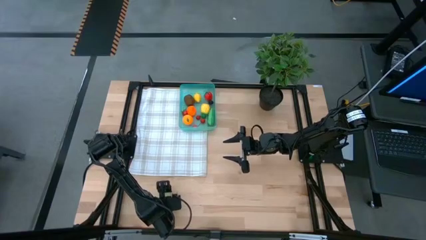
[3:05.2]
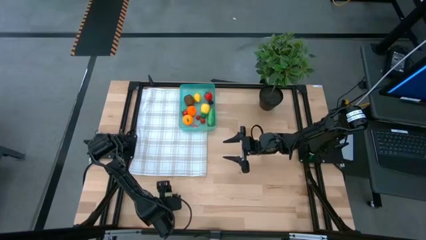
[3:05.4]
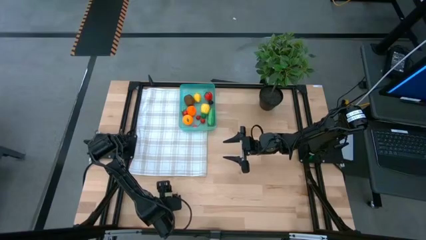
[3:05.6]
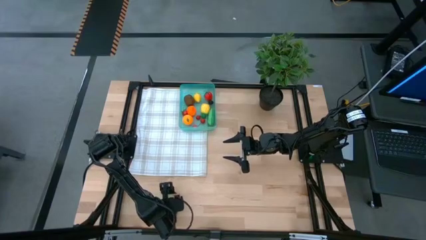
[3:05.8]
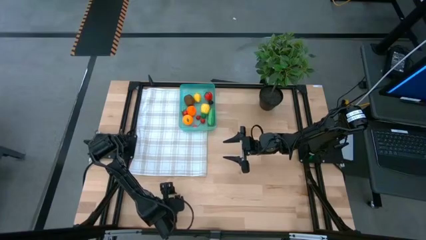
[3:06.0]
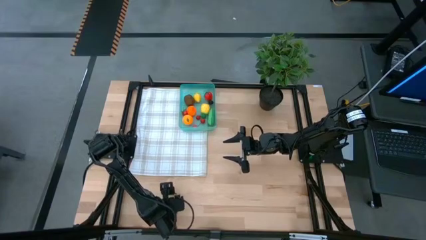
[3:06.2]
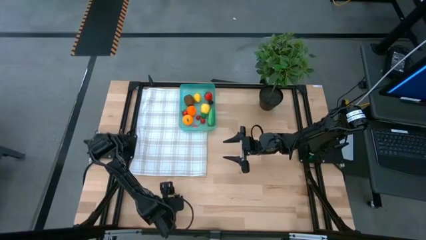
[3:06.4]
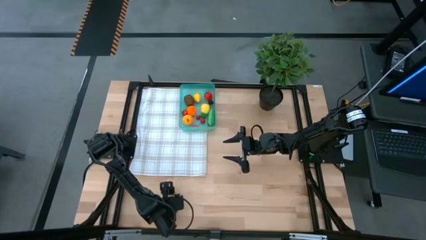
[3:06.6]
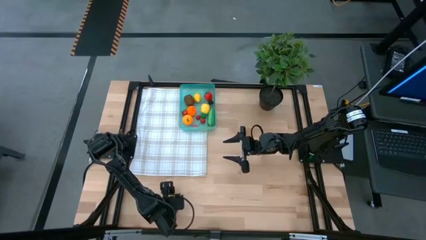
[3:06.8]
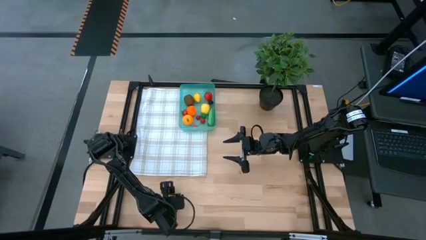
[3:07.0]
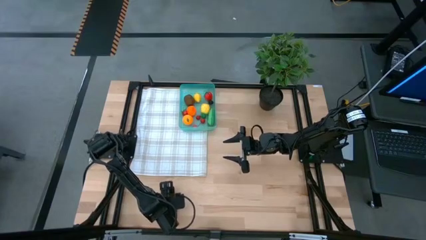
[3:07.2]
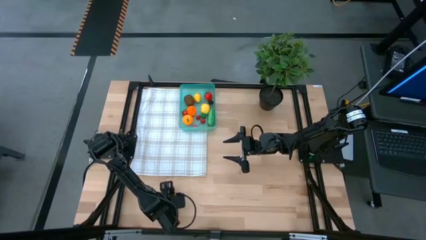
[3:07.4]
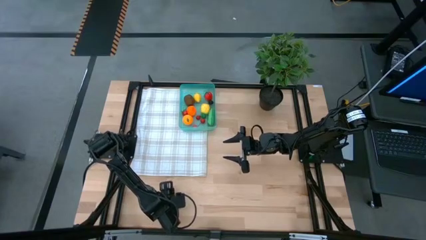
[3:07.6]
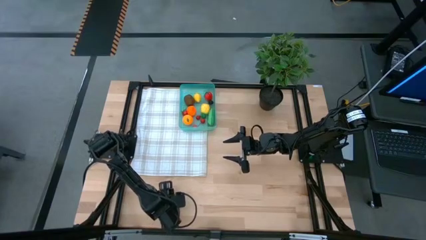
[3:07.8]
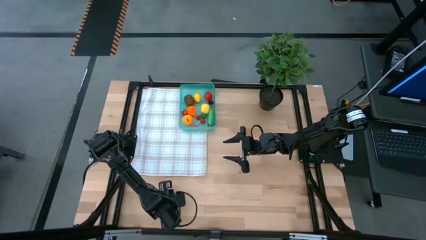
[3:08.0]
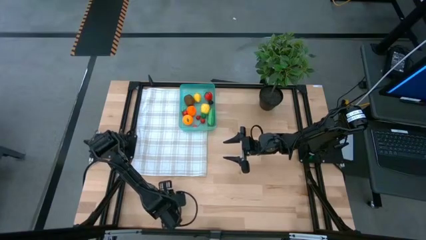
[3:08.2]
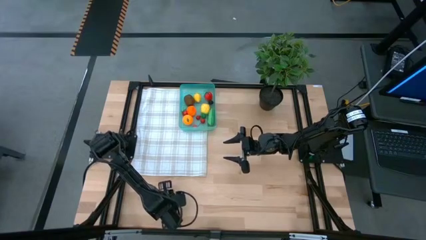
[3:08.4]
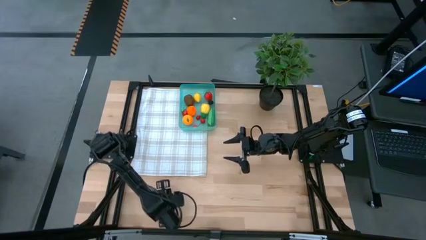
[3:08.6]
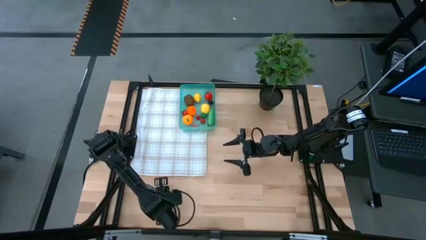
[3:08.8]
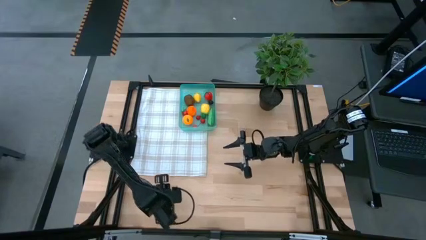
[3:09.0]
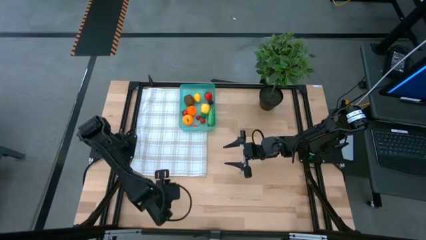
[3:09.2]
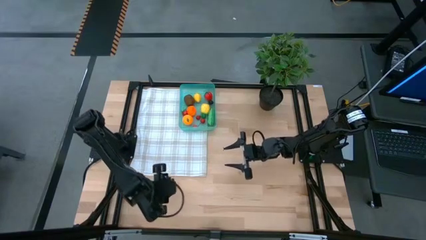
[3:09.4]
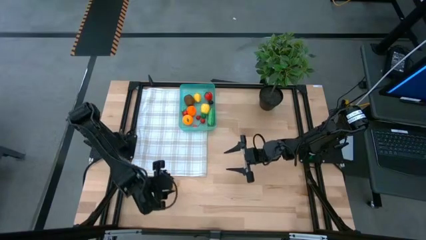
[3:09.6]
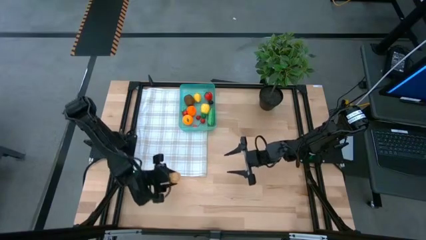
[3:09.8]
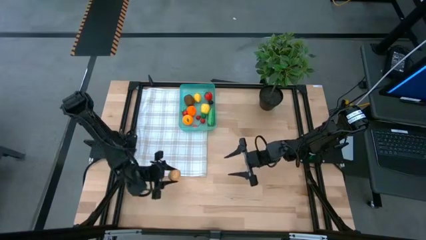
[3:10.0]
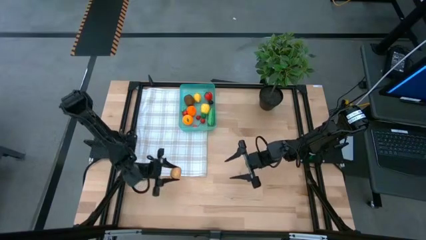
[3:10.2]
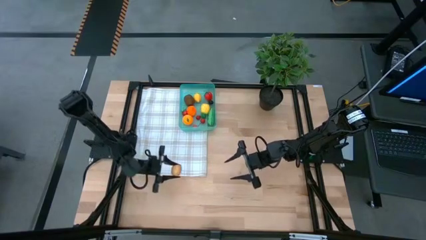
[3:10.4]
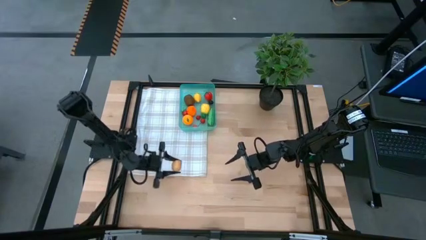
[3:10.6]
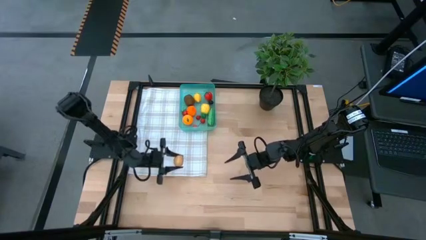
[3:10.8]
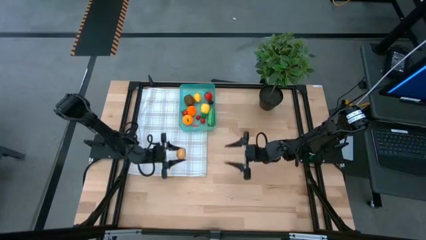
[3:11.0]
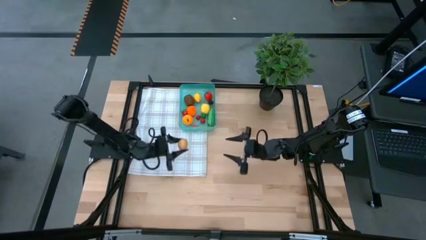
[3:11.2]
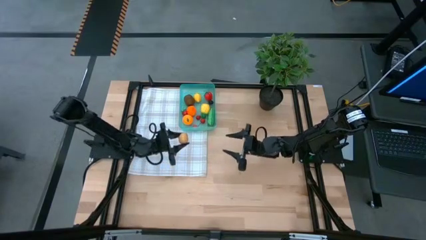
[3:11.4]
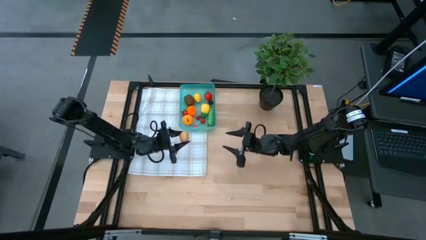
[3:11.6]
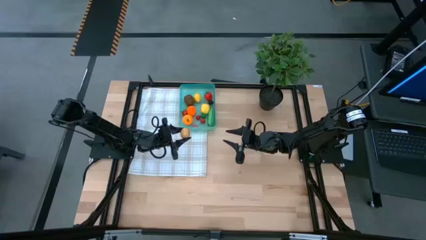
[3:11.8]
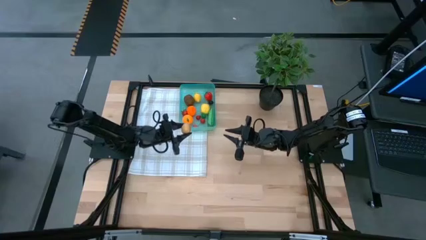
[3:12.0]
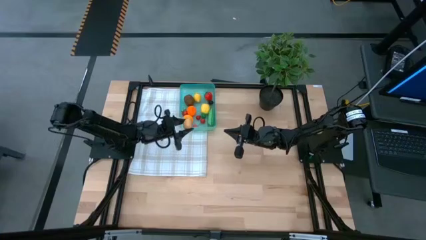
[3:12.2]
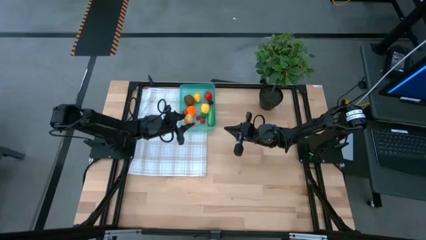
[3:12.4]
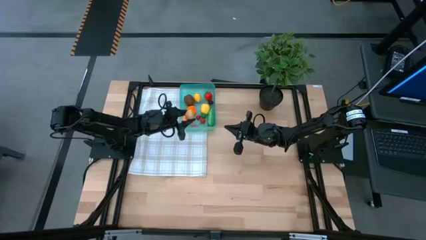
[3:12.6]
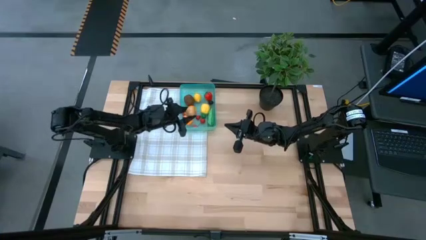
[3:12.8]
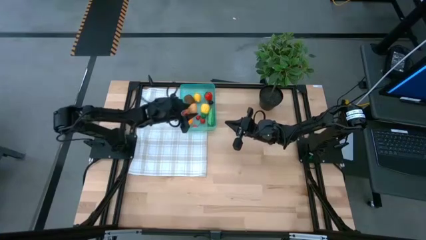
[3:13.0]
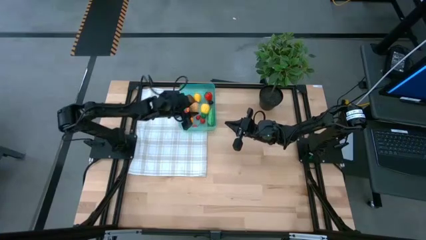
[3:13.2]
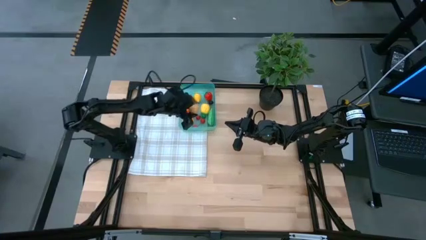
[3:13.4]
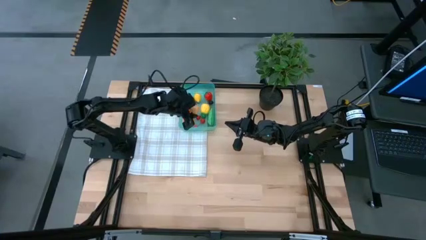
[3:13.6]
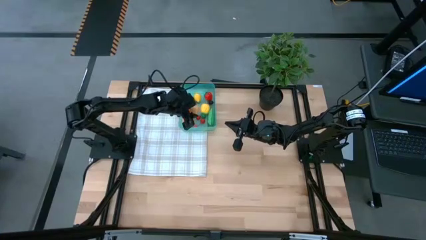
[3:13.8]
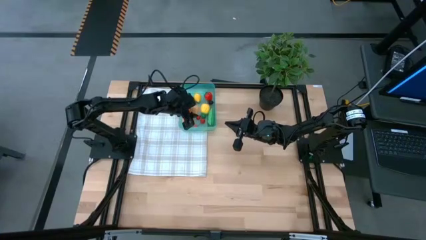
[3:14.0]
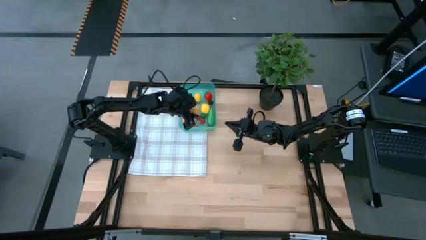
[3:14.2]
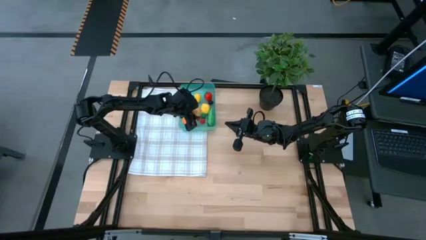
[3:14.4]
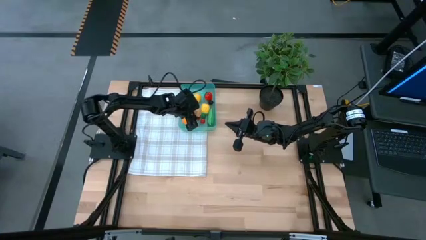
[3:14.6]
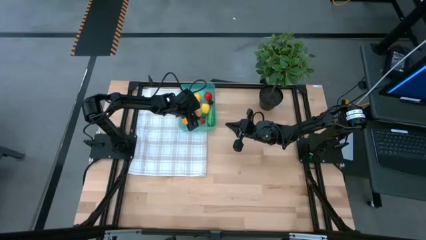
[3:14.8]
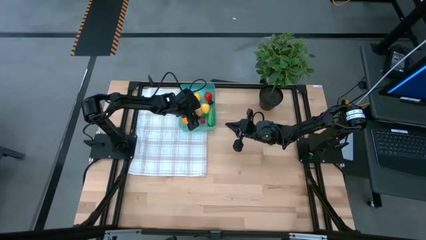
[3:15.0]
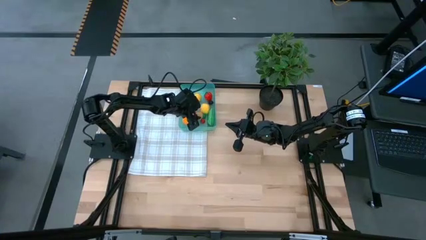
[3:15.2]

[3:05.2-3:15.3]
Task: Pick and placing Produce into tupperware
Put the brown potato into the blue bin

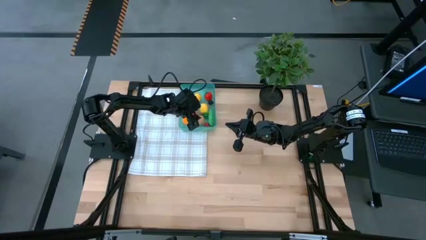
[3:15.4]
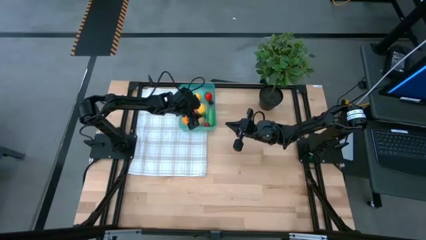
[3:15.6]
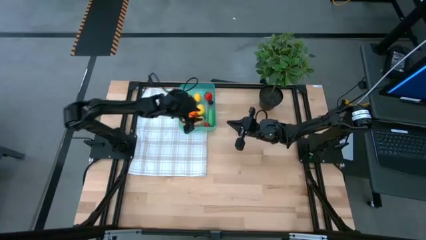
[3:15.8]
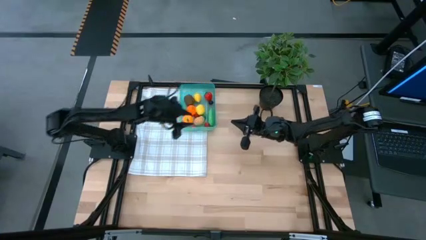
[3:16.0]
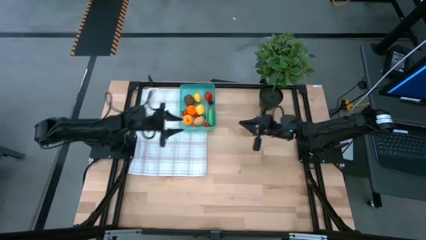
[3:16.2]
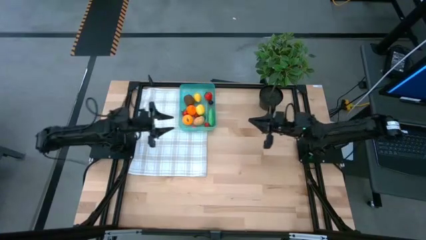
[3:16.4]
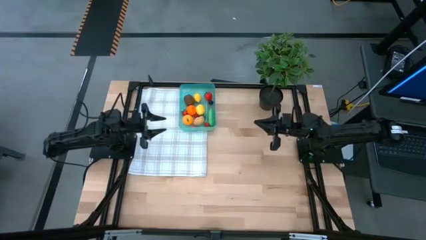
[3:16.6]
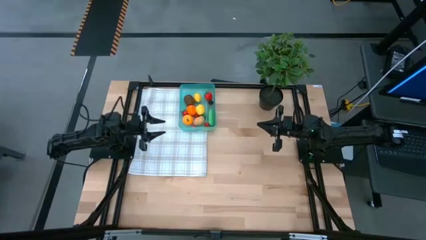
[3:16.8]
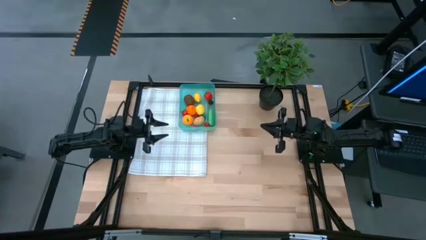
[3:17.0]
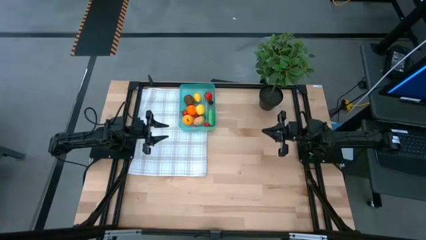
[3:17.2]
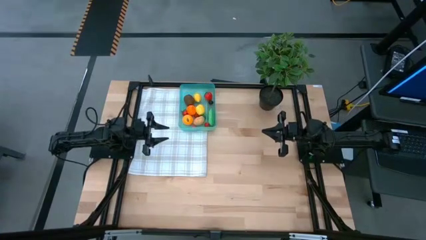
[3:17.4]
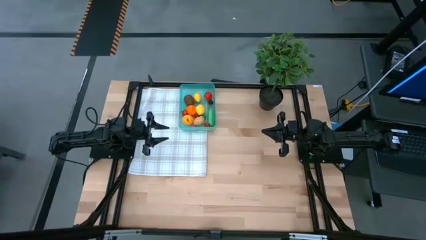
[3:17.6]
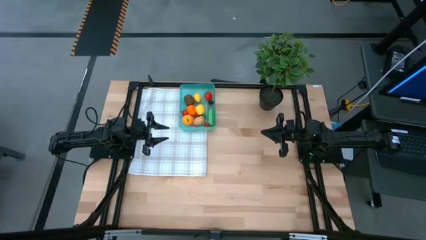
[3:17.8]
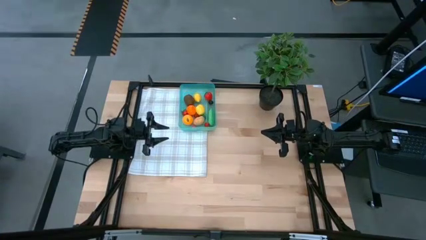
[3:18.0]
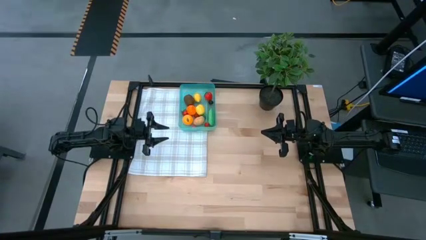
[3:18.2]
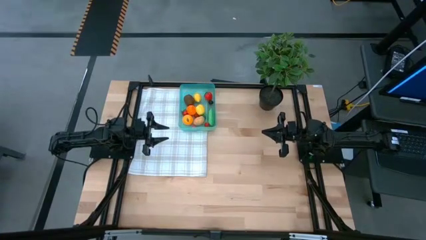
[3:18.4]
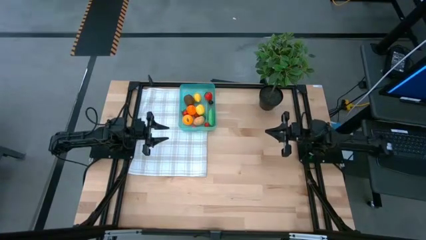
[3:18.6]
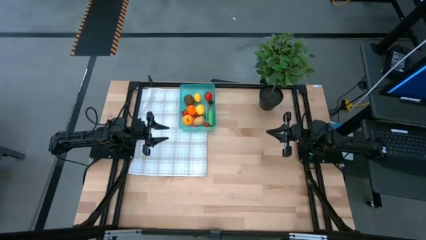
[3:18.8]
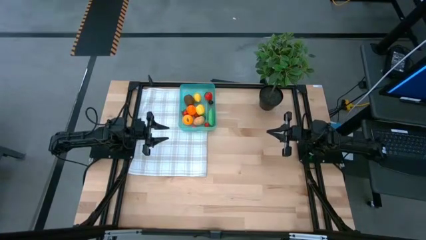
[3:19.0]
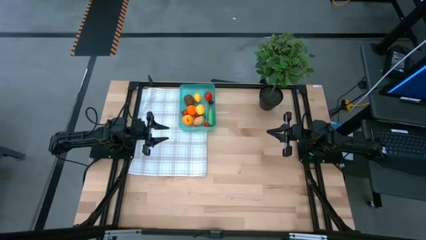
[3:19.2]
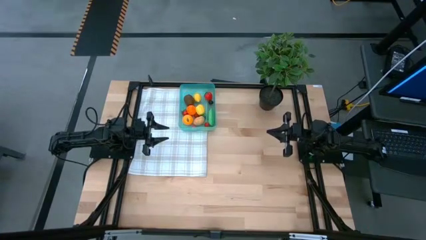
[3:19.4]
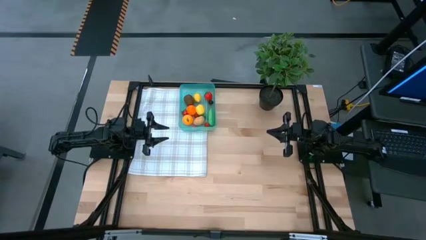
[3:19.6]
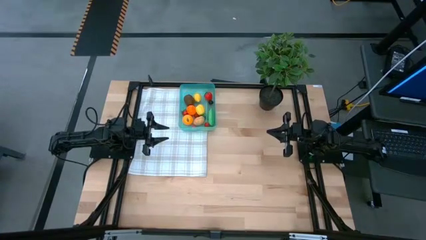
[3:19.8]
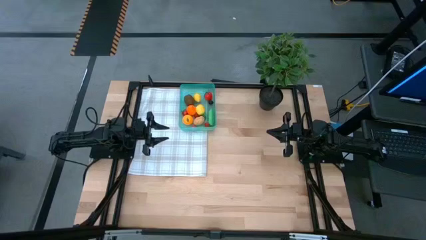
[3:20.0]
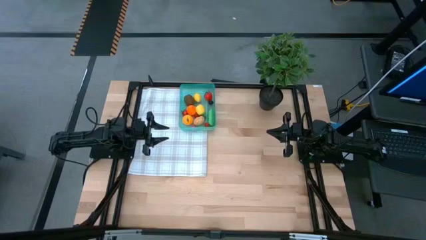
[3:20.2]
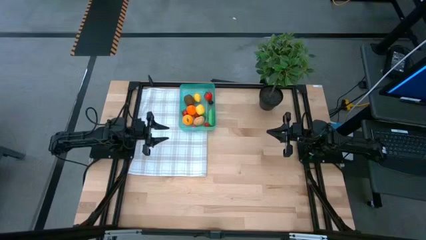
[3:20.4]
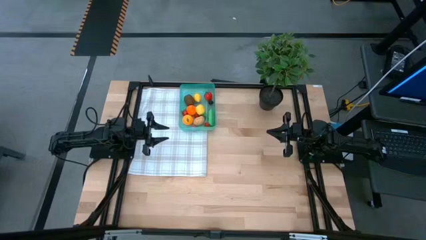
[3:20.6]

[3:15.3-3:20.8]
Return to Home Position

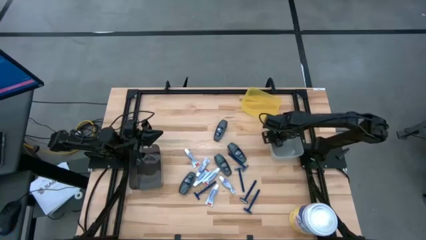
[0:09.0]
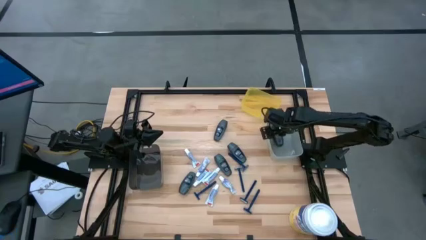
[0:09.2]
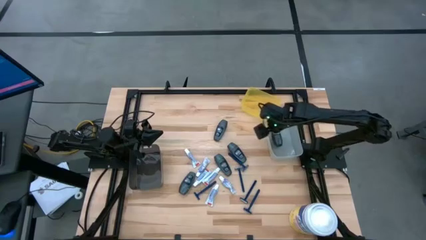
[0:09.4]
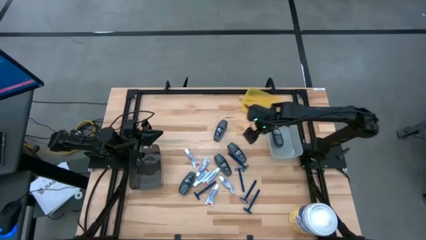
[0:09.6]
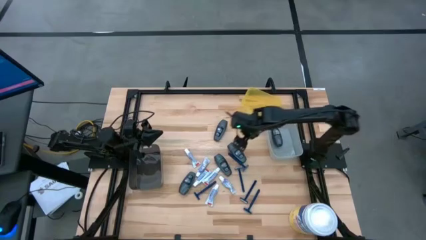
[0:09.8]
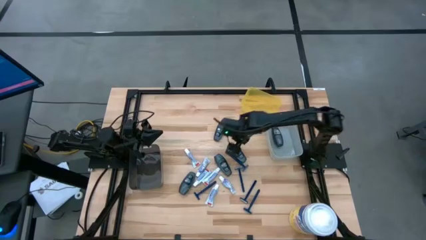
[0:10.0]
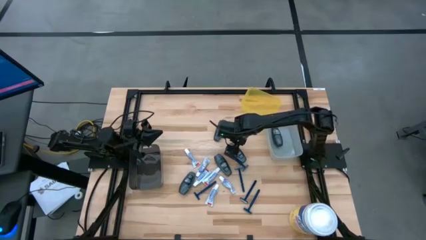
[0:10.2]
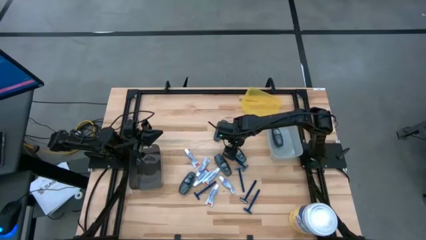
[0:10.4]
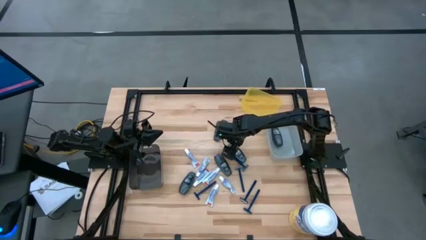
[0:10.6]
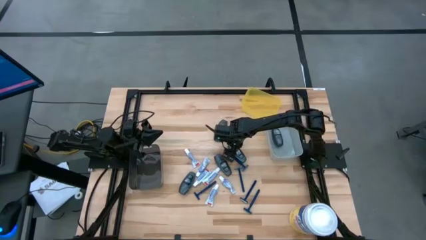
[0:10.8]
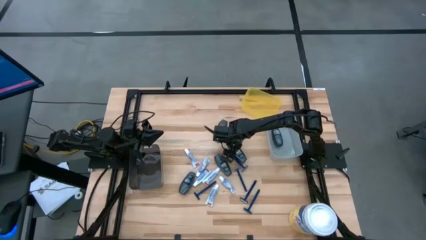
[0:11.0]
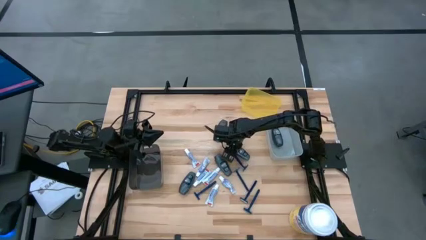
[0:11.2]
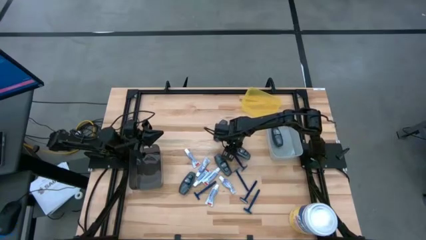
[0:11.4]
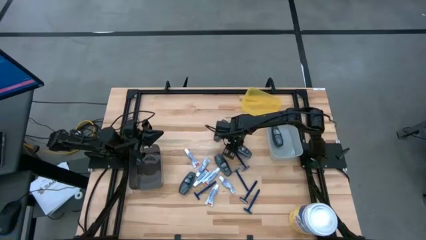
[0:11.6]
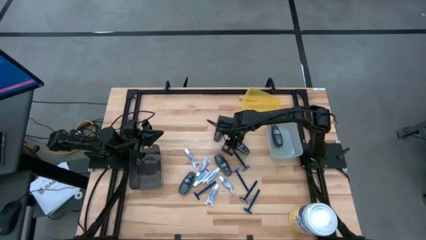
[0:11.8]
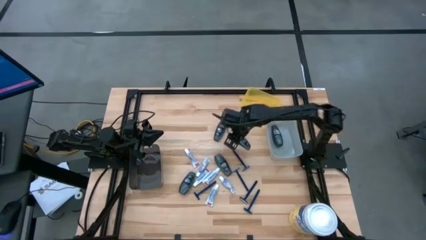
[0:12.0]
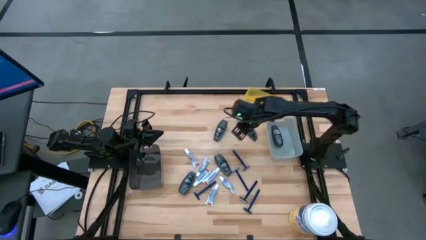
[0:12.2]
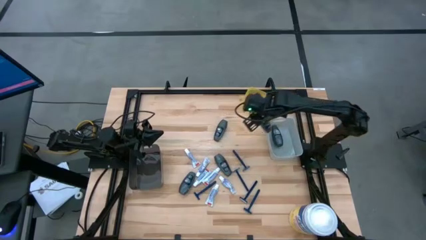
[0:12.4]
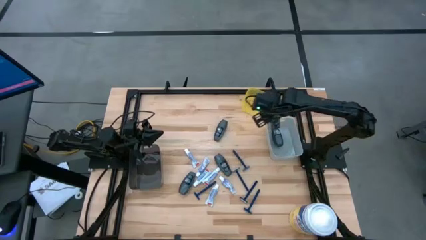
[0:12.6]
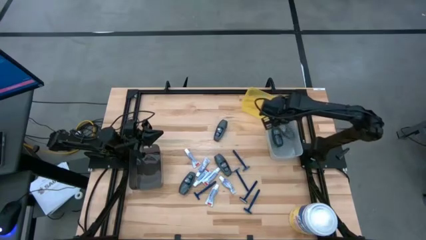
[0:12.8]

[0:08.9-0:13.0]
Task: Pick & Place Travel size toiletries
Put the gray deodorant bottle into the white bin
